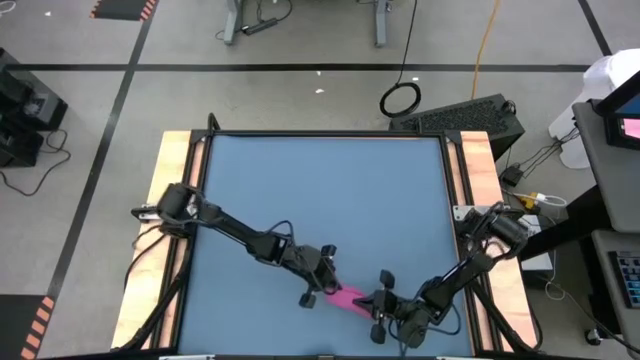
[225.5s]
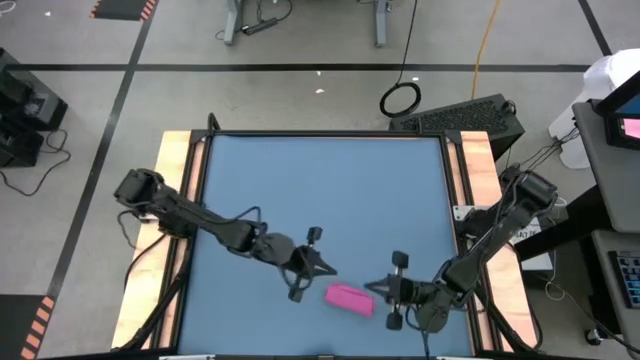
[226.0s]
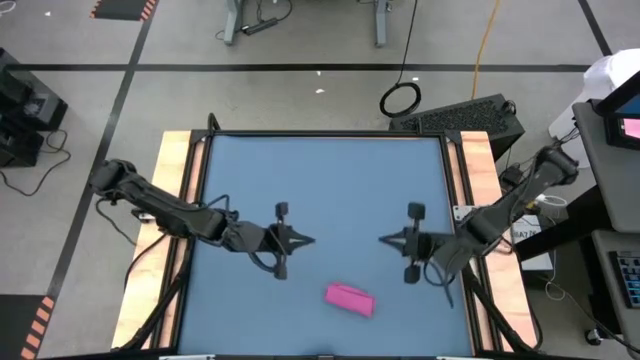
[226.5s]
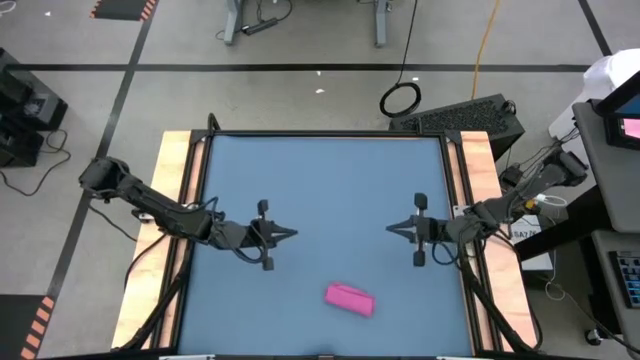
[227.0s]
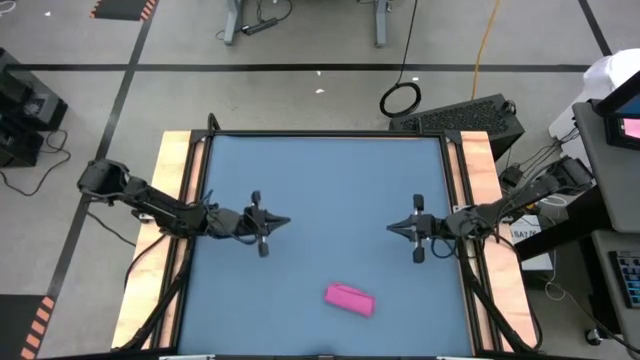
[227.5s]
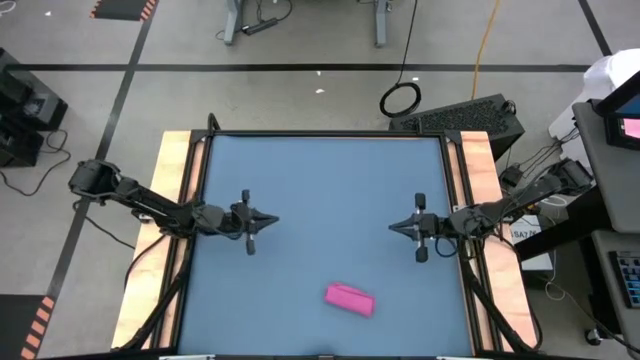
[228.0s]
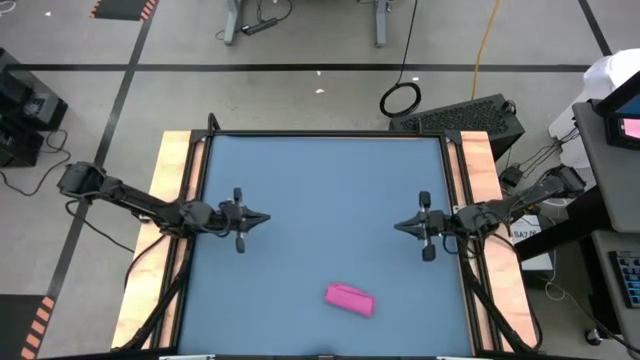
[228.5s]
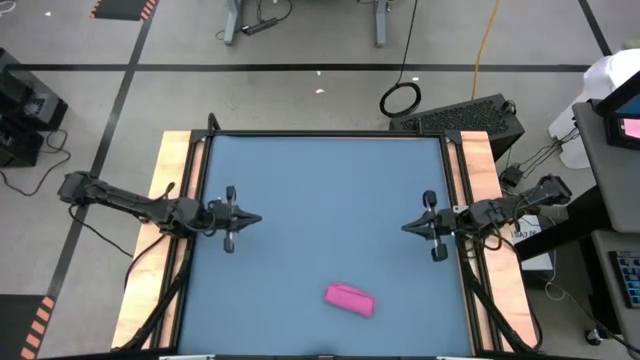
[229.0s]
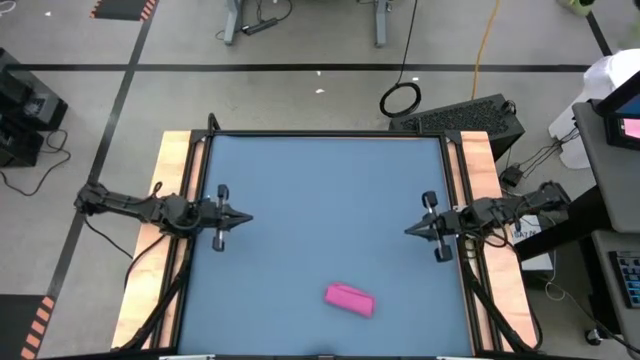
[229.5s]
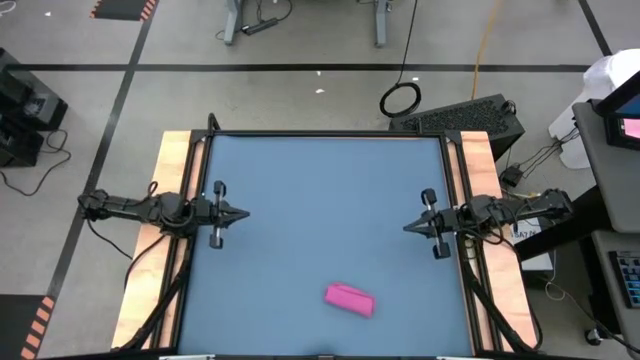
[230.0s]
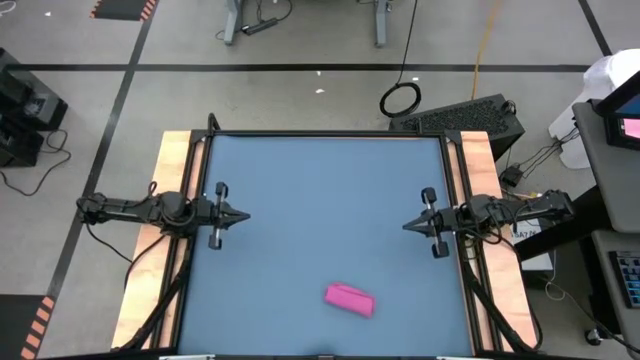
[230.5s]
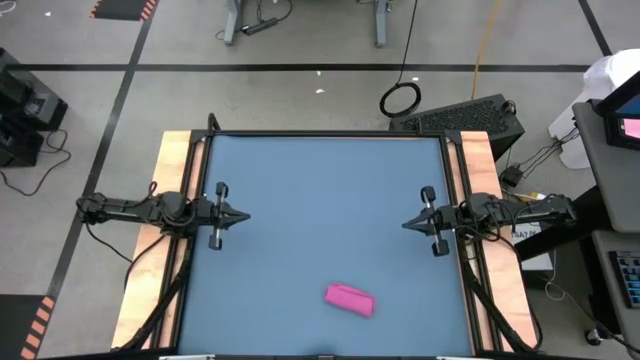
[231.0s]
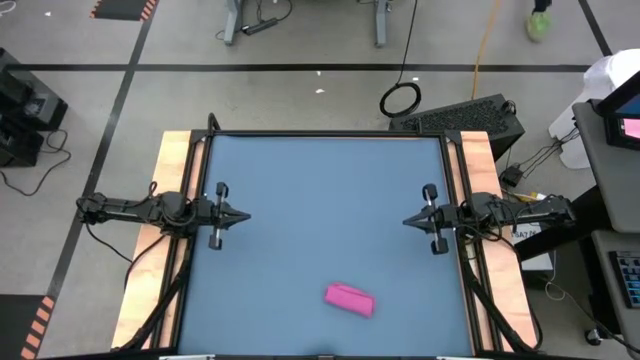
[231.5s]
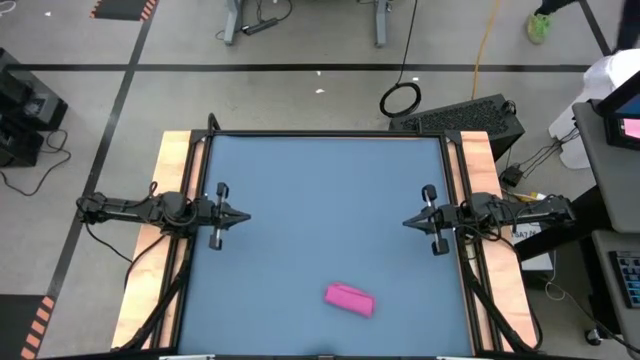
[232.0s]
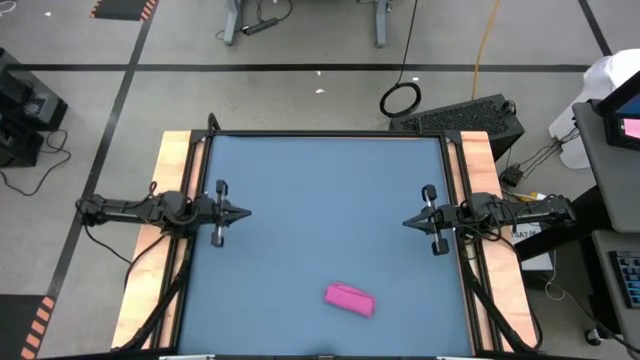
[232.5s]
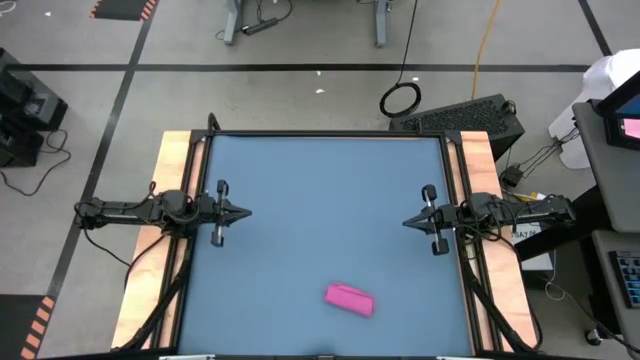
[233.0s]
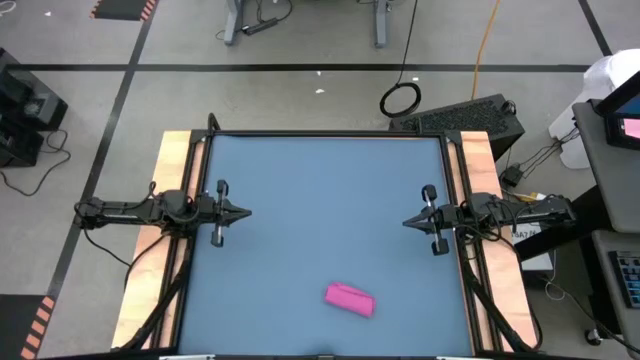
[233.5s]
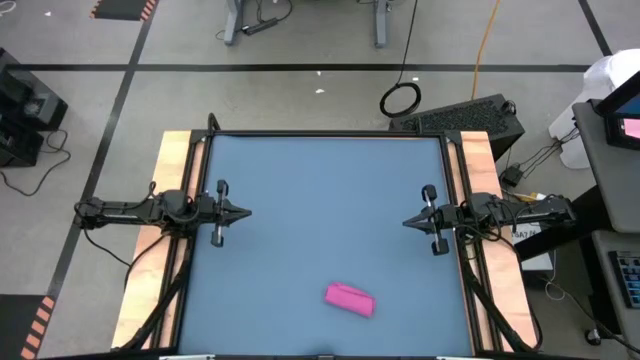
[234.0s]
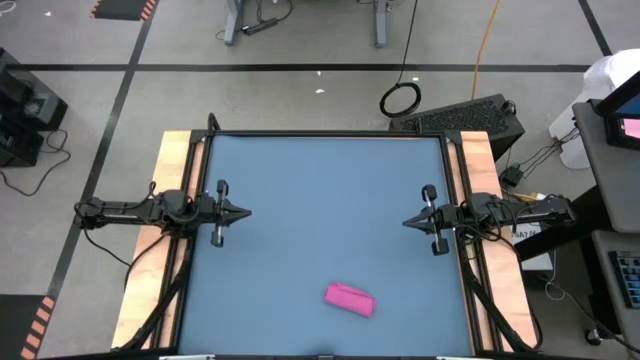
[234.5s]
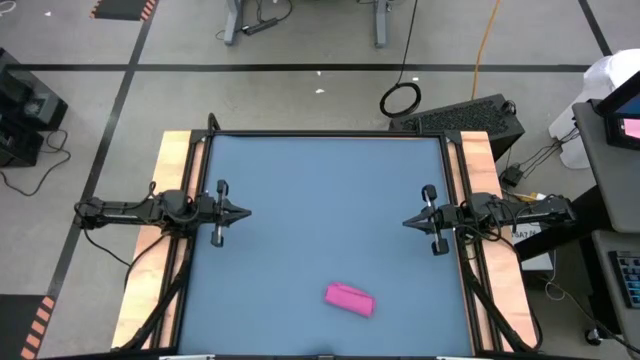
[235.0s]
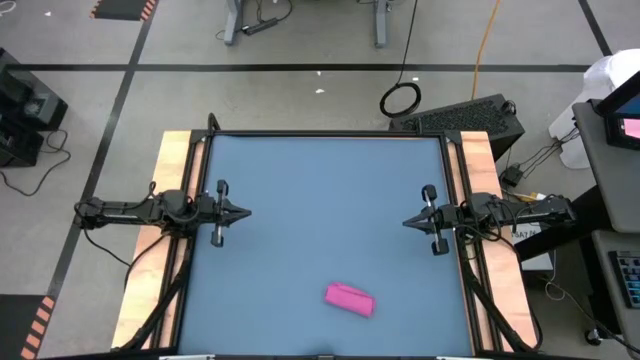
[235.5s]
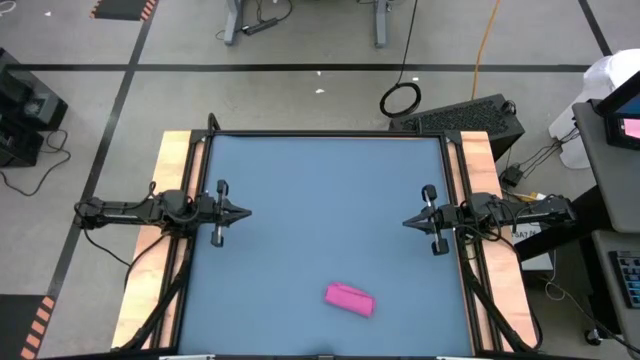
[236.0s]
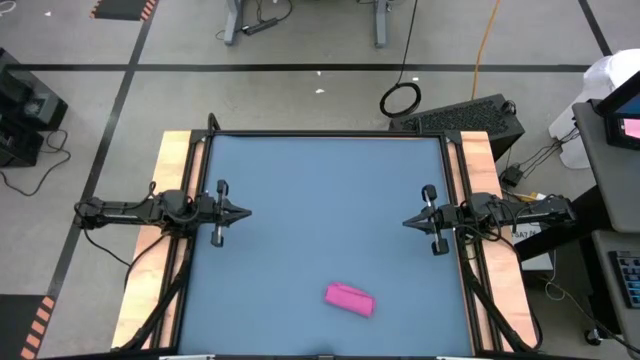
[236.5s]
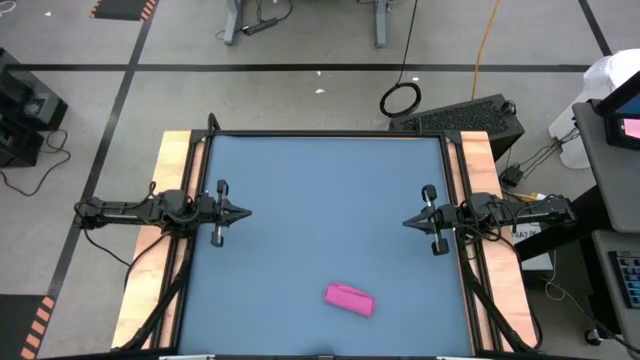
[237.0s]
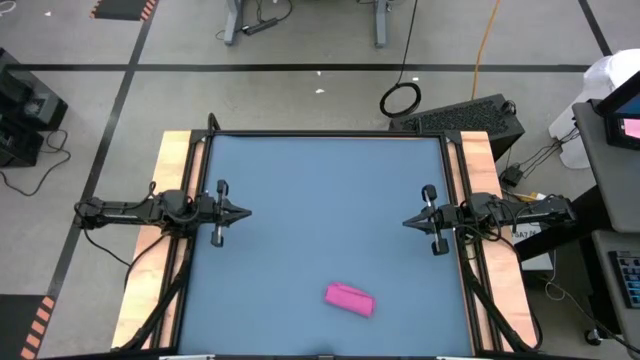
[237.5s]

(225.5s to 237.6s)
Task: Roll towel into tight, uniform cylinder
Return to Home Position

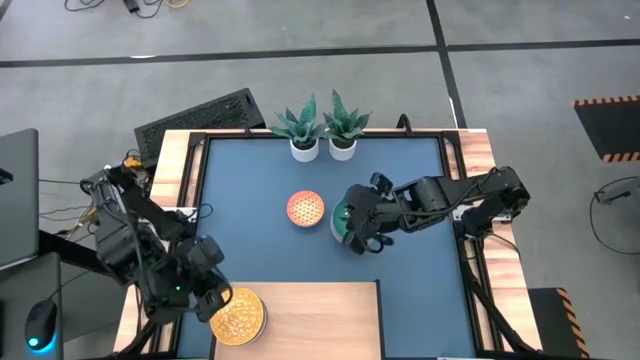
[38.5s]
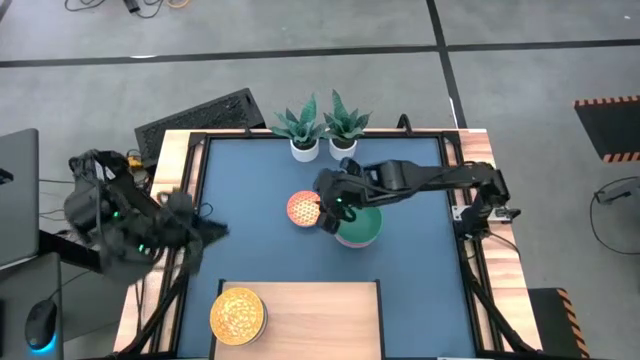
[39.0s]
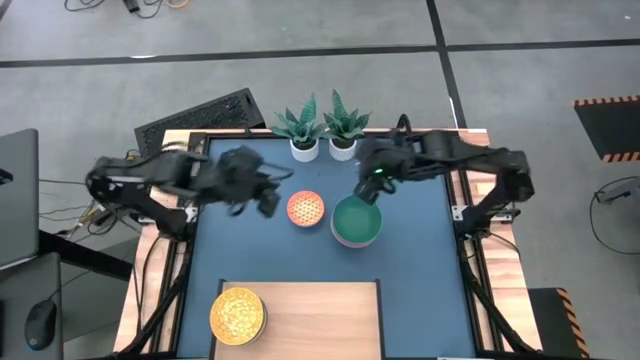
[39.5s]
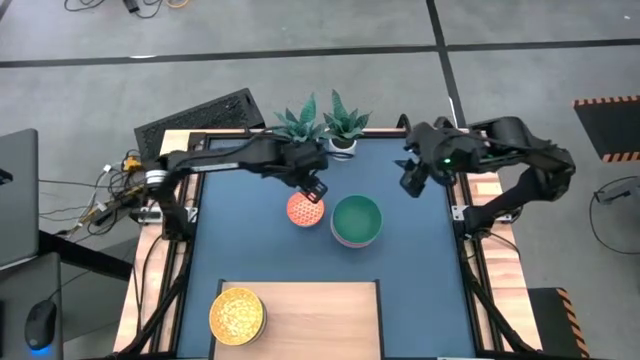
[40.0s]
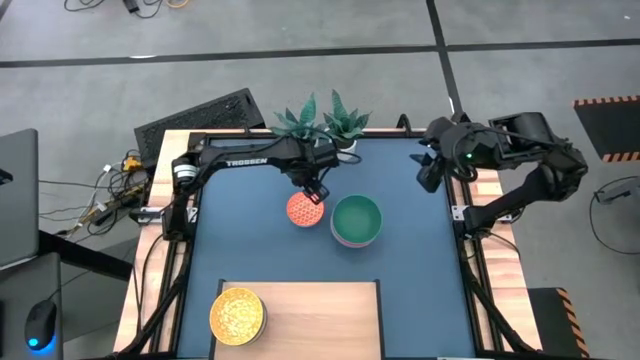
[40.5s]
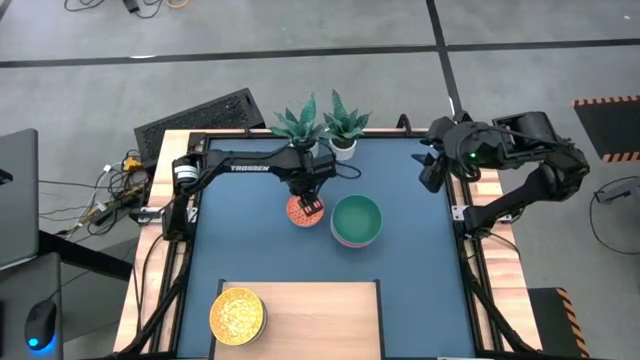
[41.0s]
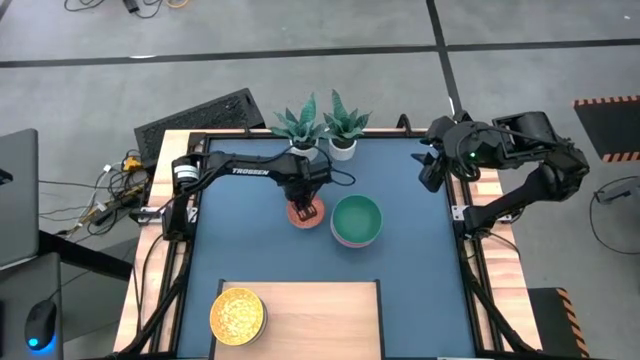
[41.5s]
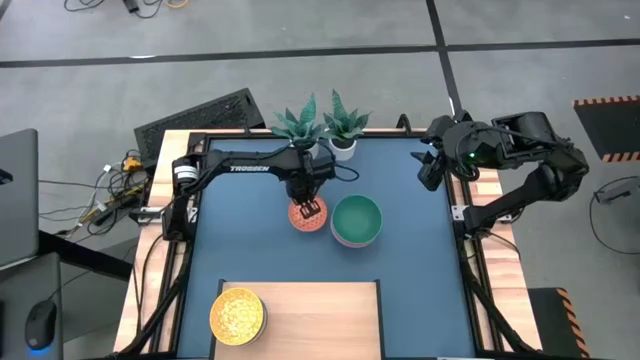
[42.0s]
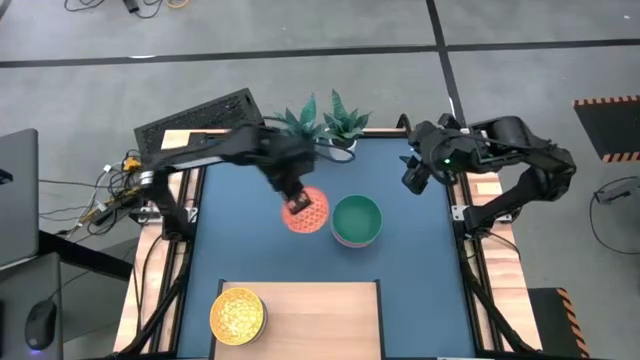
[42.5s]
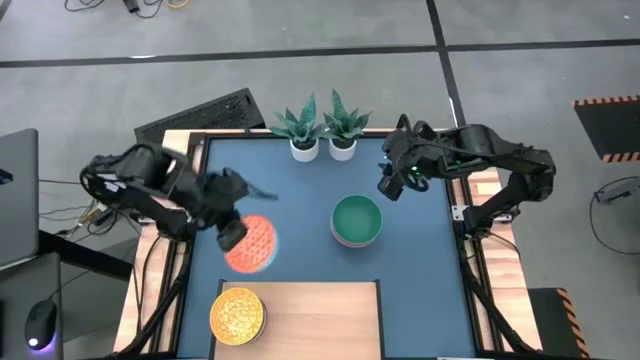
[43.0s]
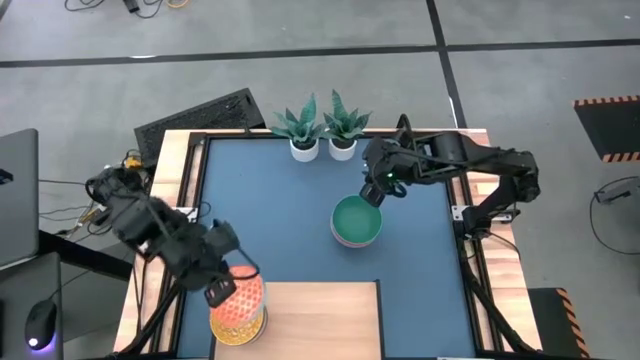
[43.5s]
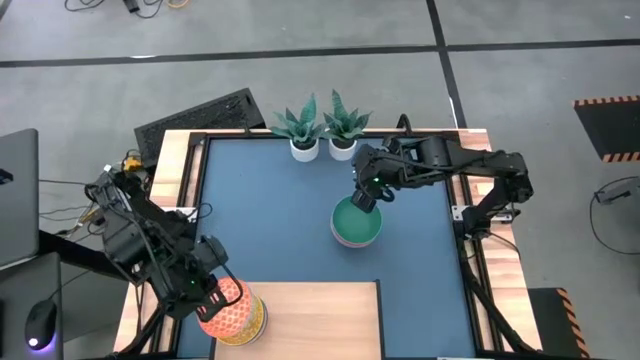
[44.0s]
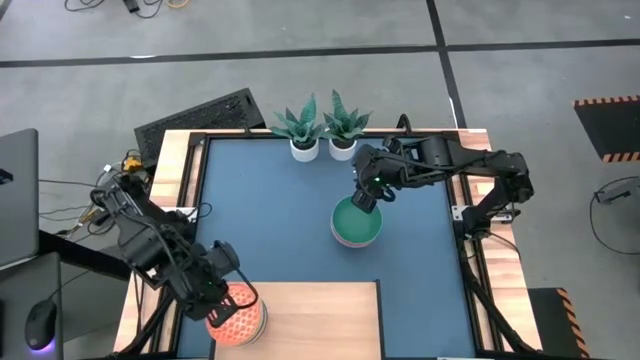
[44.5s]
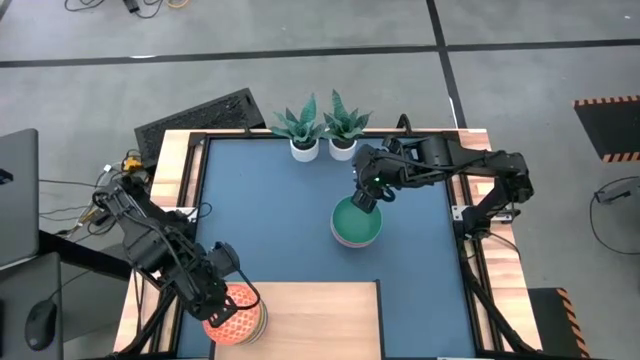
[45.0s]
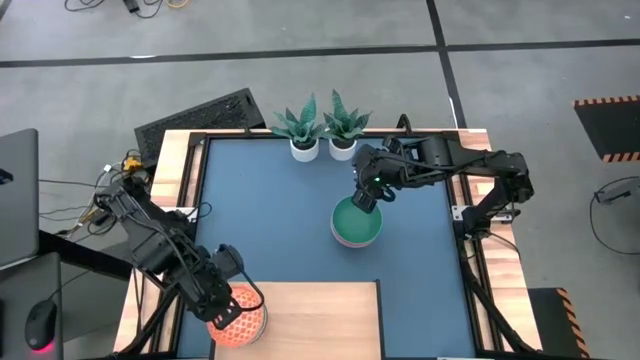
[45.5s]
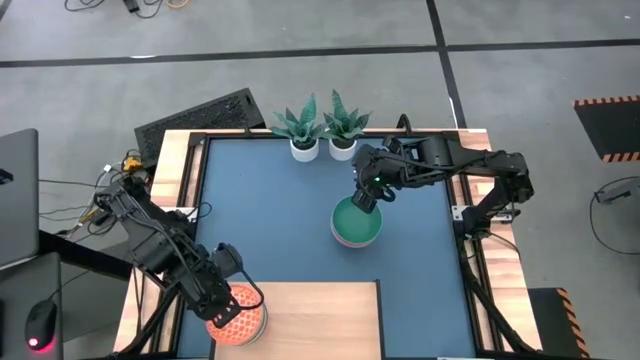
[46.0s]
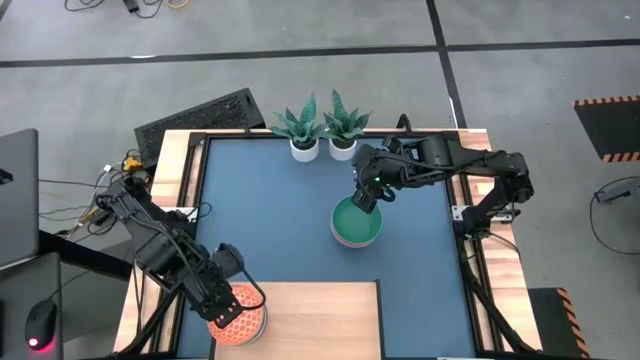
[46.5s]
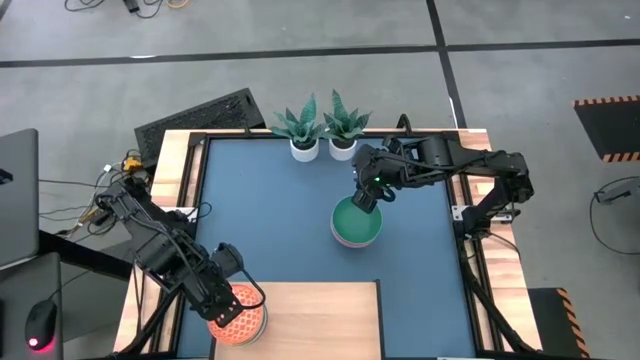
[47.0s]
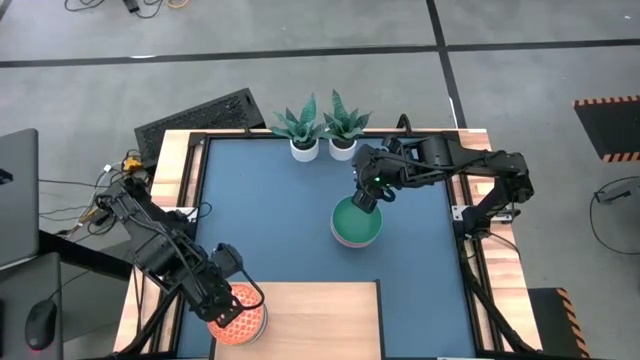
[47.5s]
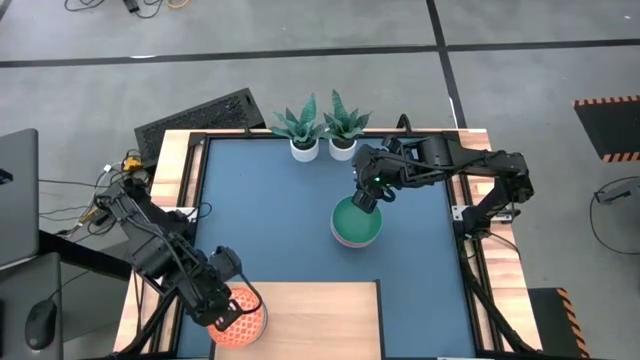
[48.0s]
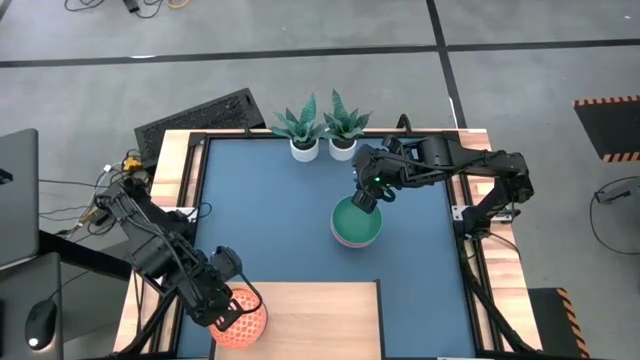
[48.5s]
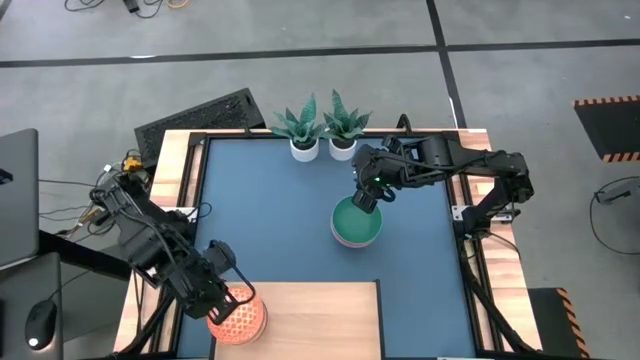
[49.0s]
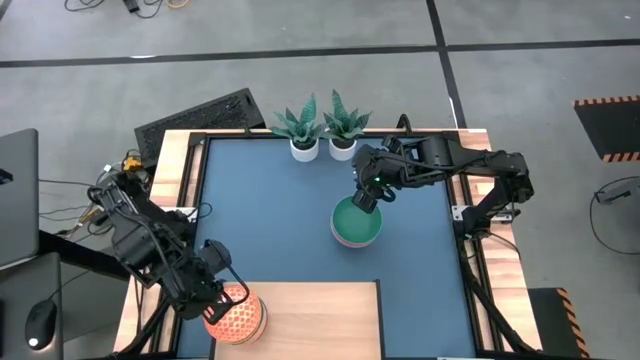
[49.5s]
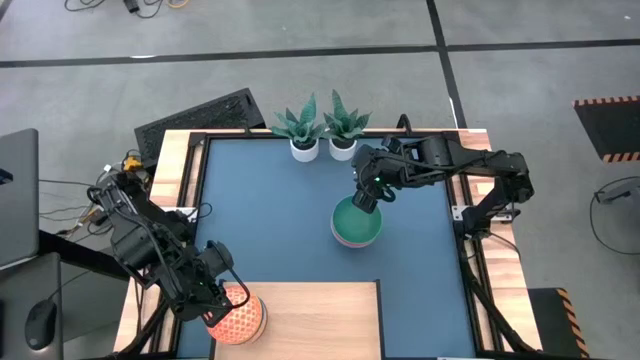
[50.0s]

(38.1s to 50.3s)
Task: Place and stack bowls onto a shelf
Stack the orange and white bowl on top of the yellow and white bowl on the shelf
